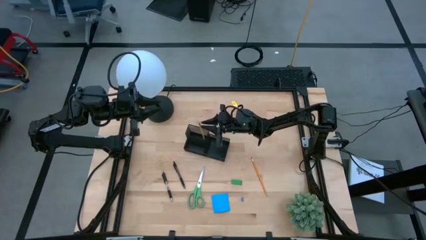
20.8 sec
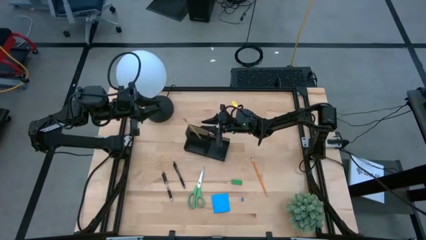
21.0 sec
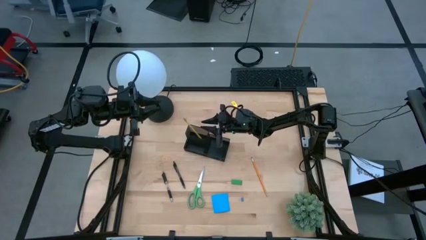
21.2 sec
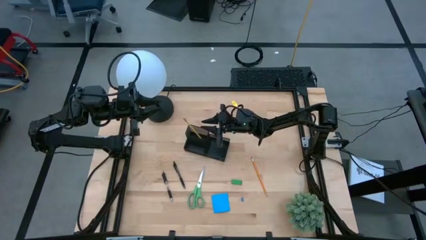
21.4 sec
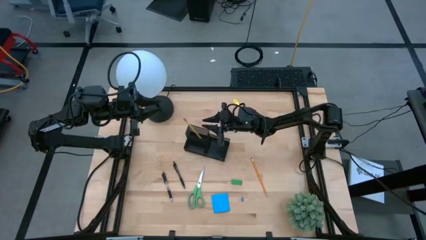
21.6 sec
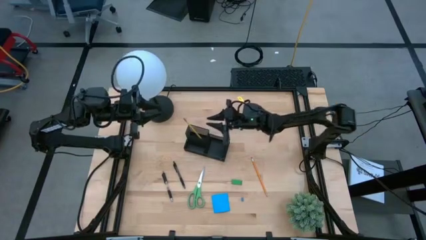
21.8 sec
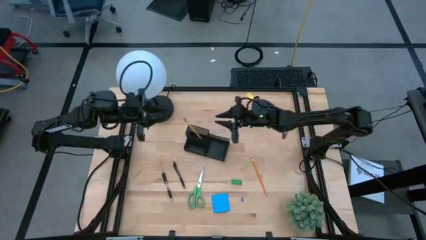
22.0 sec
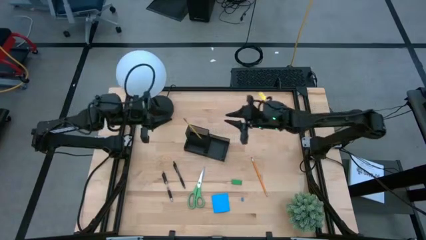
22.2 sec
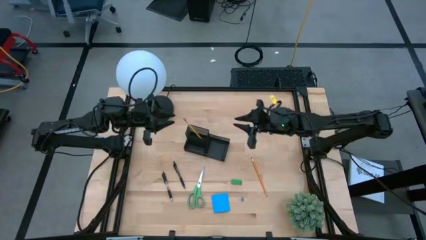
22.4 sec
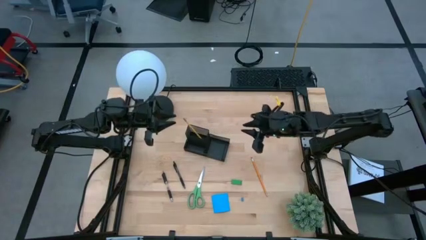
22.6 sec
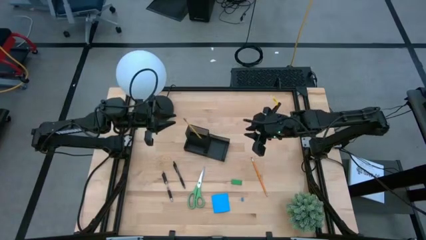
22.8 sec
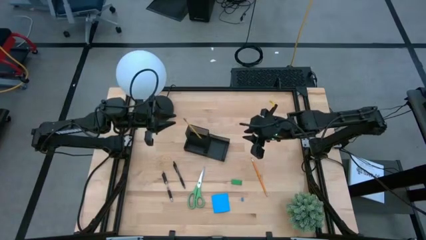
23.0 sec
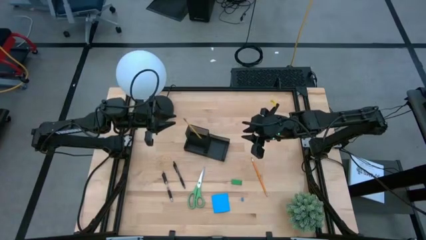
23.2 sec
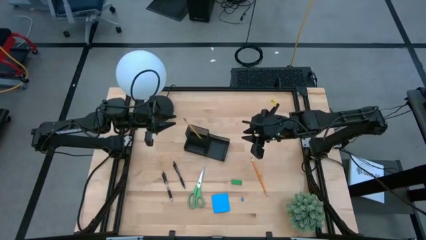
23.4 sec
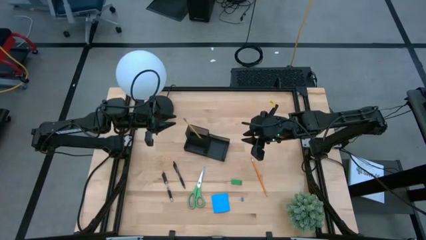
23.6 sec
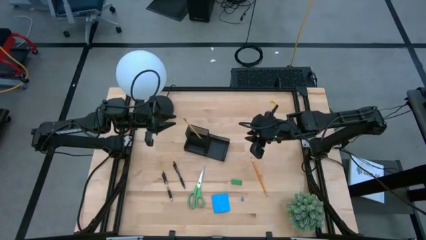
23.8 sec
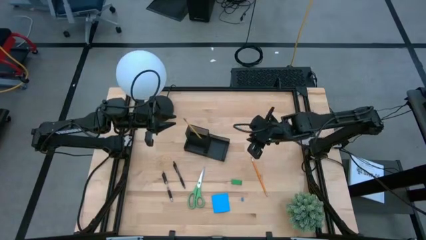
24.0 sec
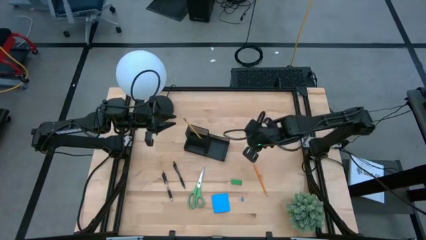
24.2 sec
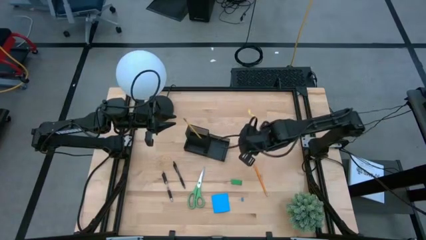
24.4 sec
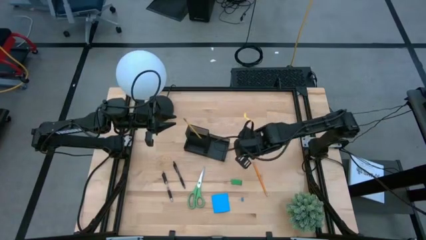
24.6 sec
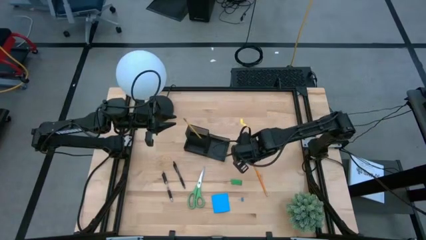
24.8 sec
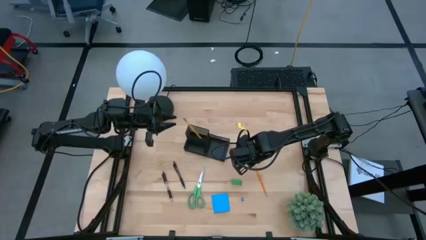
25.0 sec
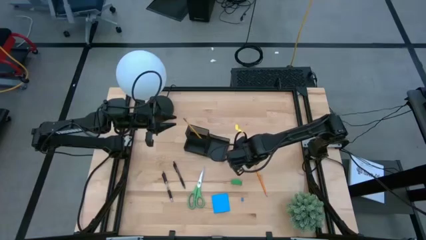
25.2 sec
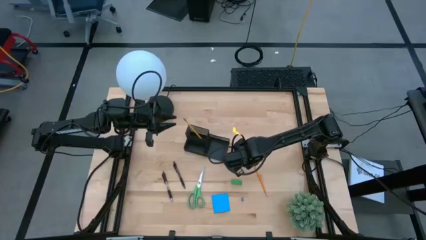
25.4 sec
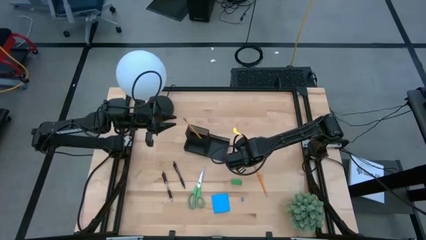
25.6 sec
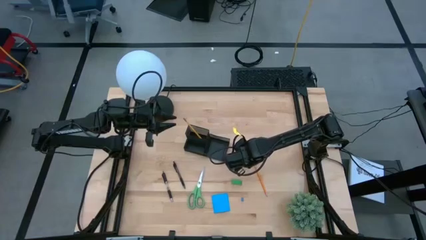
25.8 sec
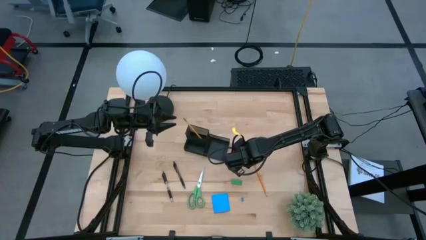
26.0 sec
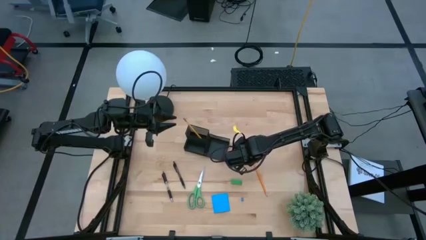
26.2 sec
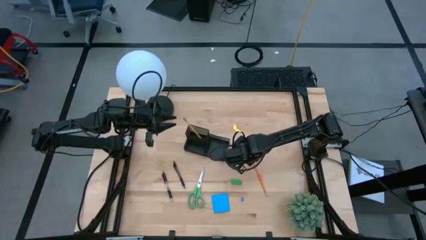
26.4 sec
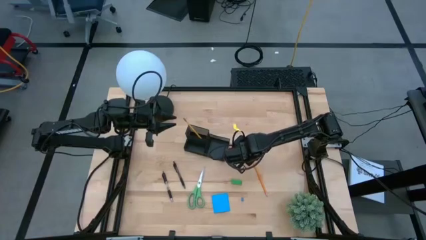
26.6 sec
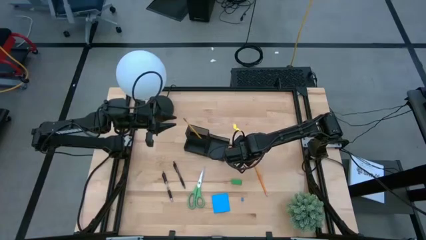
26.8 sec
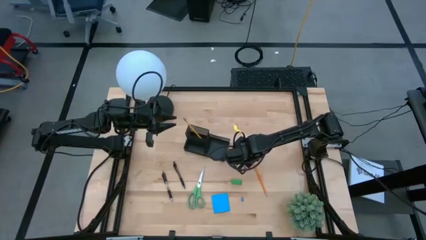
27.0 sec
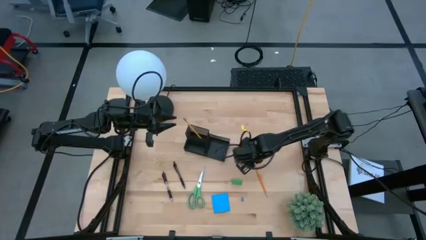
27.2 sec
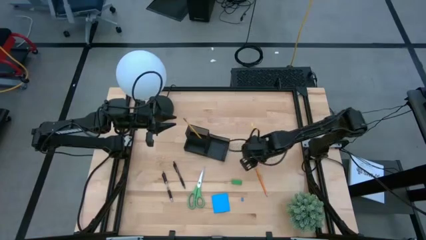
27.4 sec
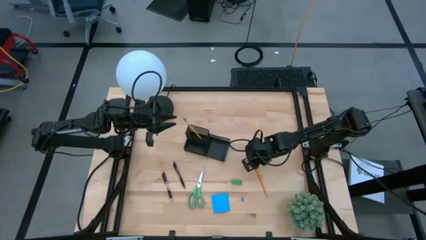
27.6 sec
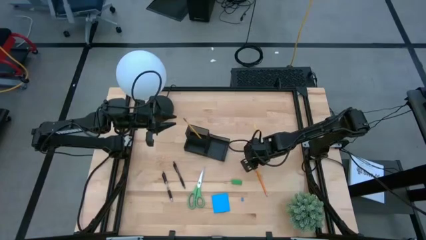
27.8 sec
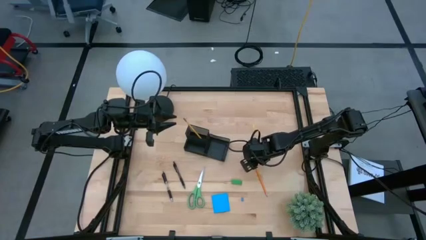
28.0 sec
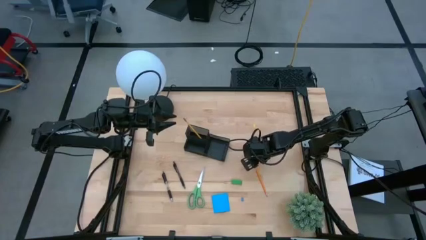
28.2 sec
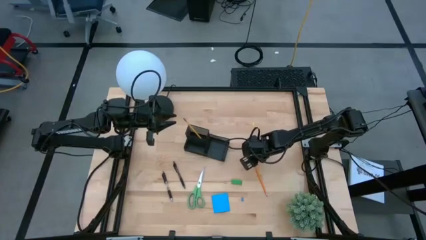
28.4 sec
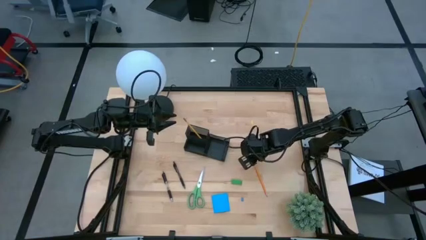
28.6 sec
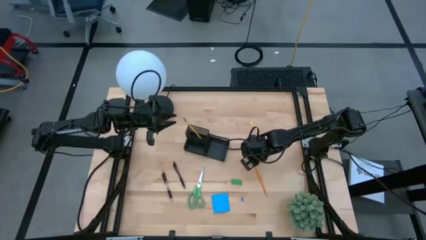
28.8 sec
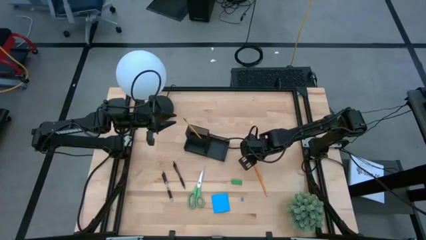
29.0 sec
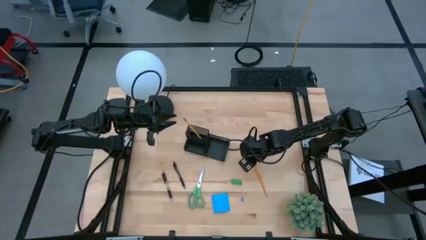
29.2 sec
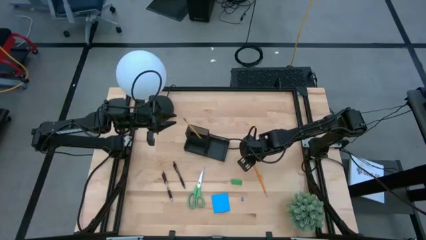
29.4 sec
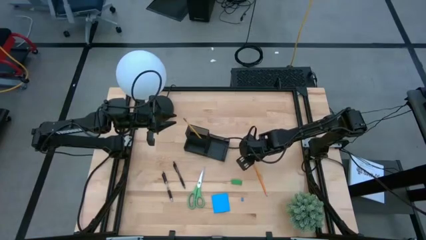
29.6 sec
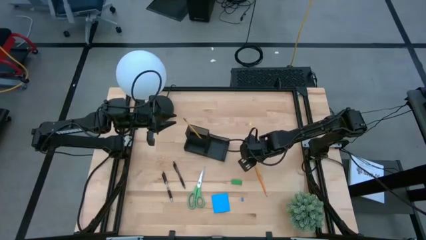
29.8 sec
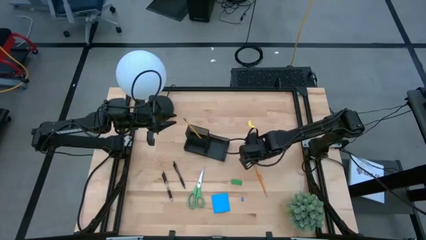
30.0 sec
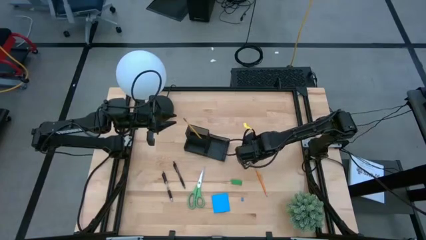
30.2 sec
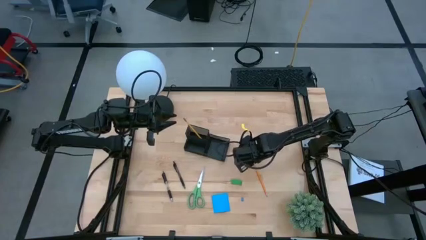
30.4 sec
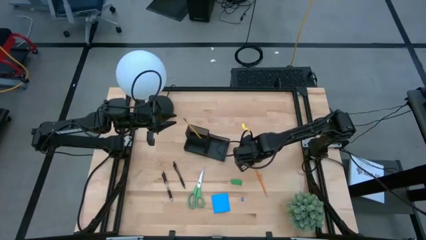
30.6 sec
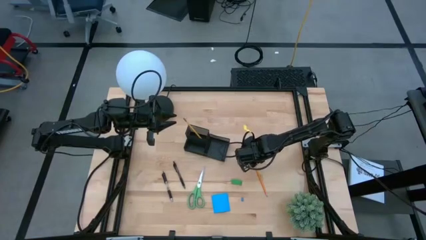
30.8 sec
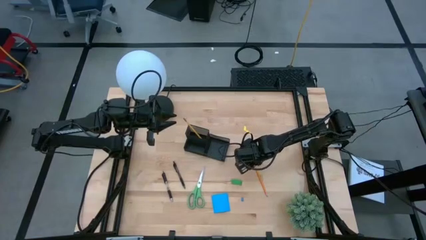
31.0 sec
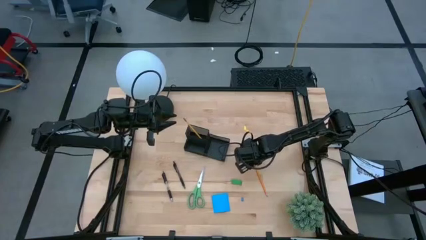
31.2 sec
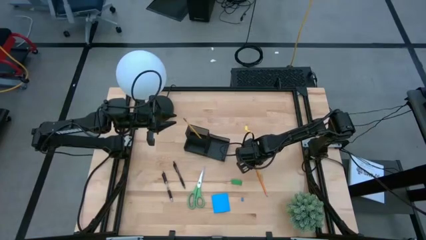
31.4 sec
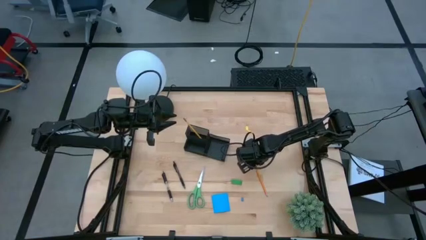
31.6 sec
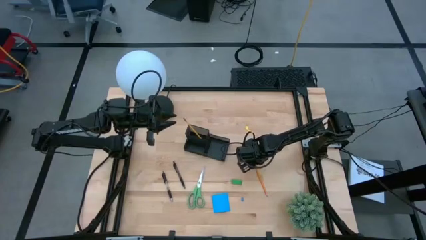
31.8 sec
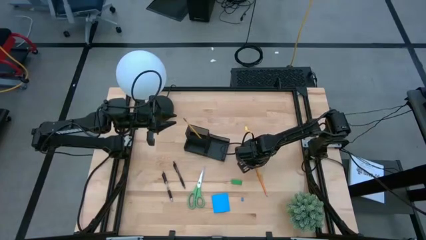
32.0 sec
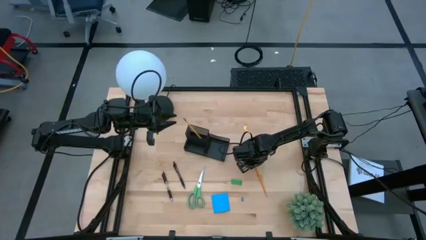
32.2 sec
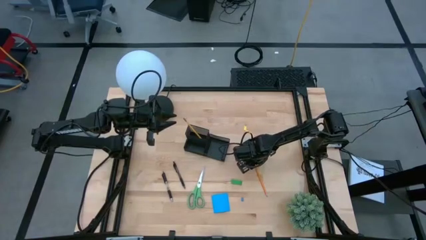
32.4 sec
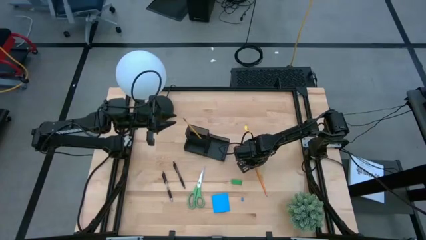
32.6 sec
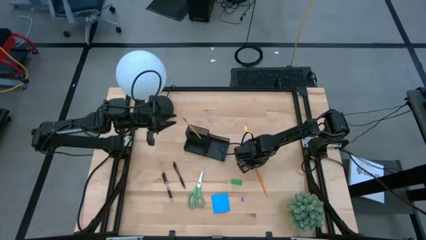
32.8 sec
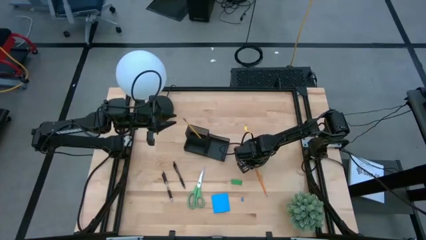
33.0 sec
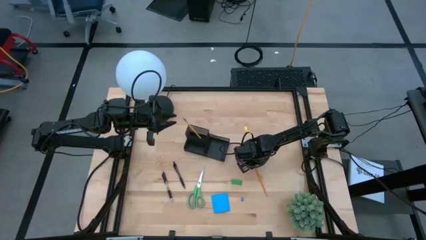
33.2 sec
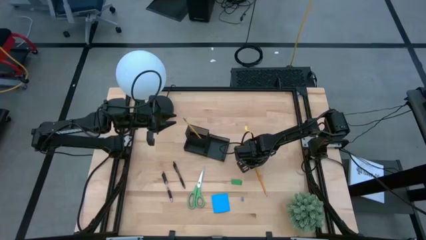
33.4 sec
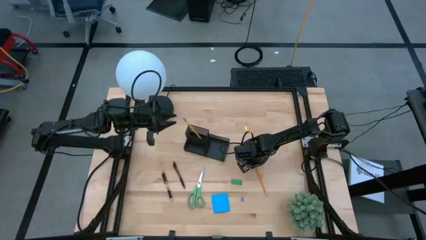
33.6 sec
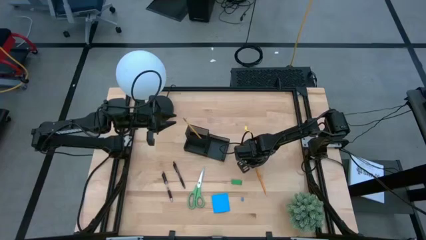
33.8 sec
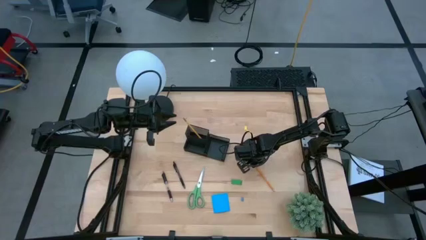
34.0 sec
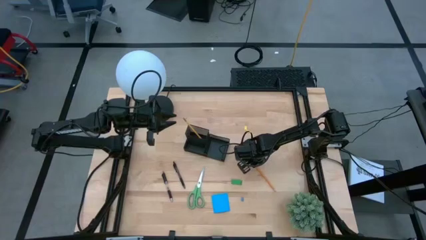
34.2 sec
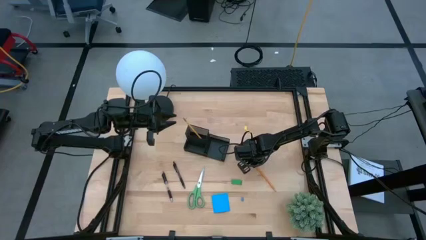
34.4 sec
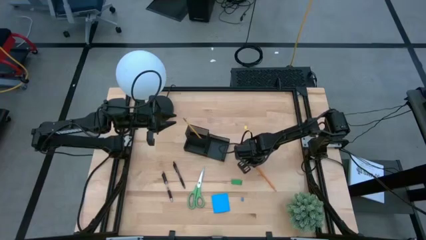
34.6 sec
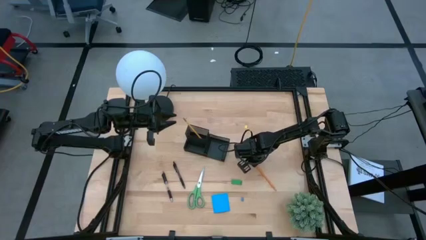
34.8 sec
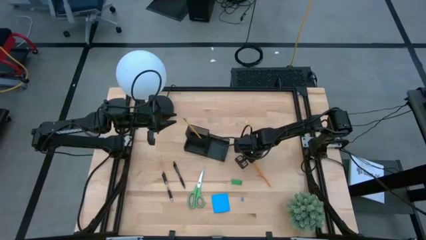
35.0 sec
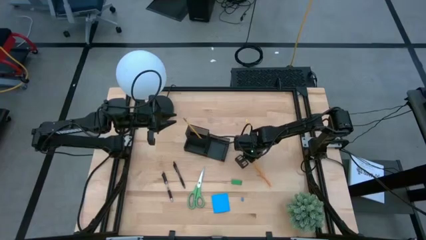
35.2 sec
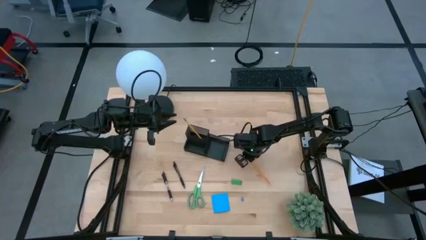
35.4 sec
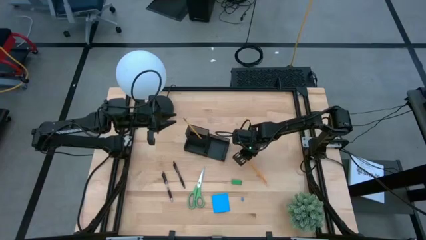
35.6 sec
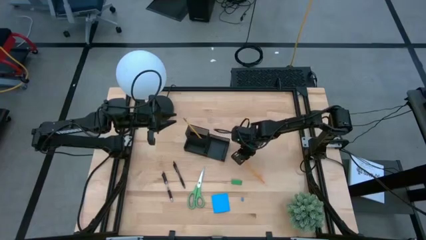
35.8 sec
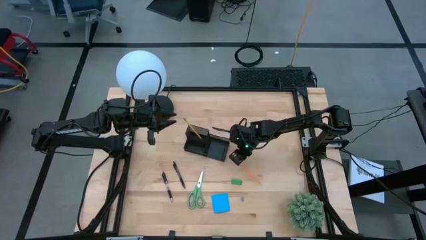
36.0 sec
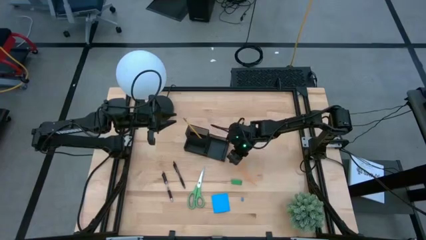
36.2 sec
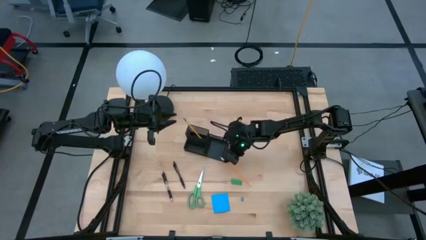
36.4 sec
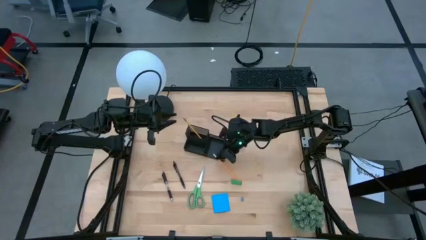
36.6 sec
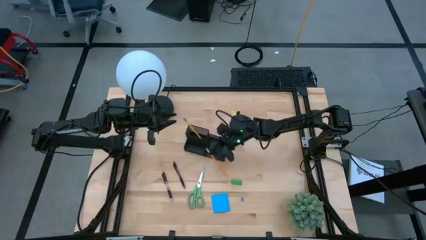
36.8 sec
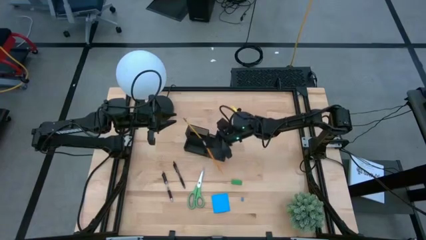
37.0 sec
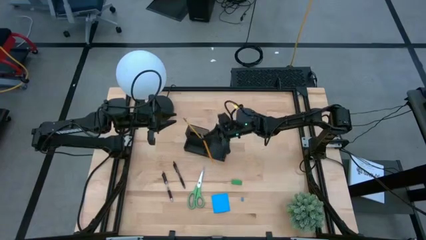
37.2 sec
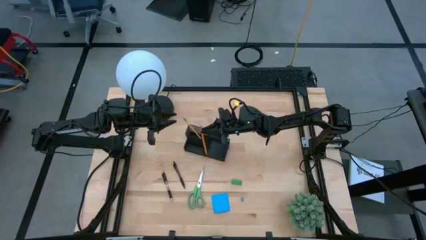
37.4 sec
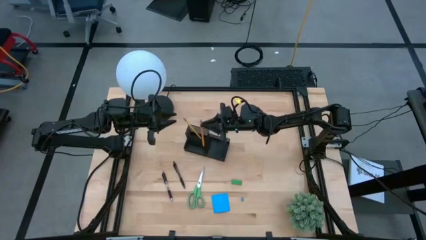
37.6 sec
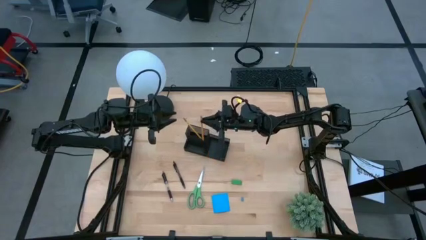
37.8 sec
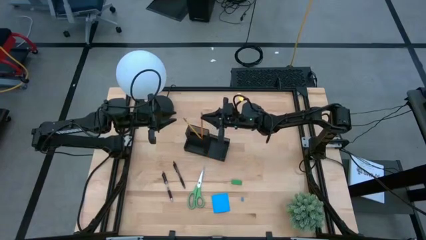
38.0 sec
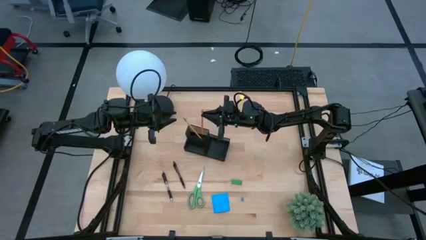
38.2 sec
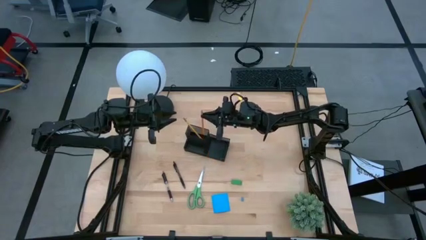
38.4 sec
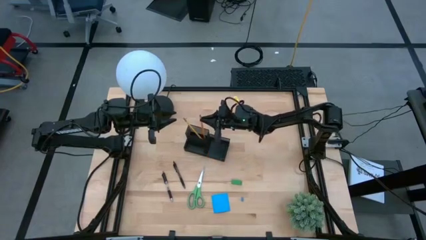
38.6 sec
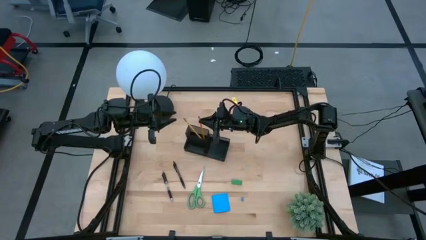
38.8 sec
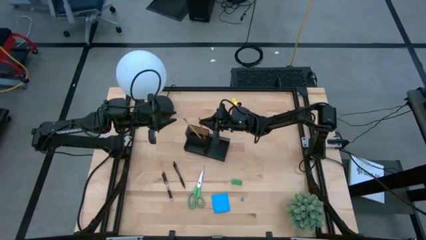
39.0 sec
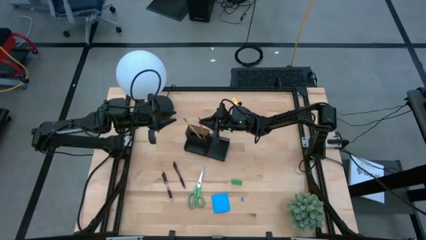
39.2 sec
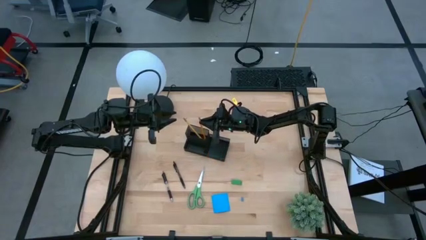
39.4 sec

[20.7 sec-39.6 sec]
Task: Pick and place office supplies into organizer
Put the orange pencil into the black desk organizer
